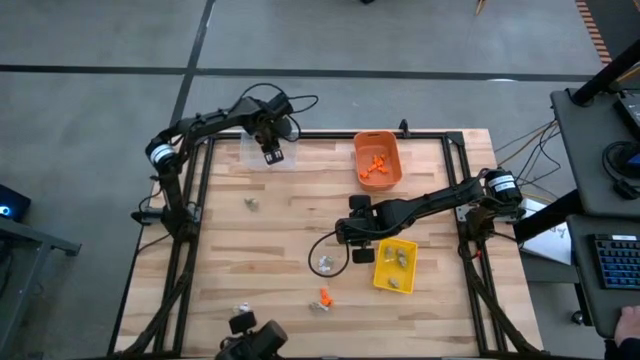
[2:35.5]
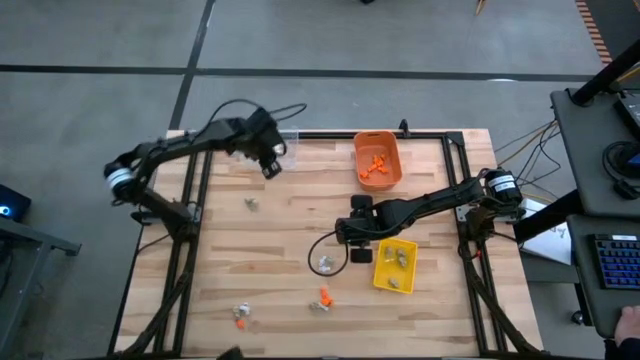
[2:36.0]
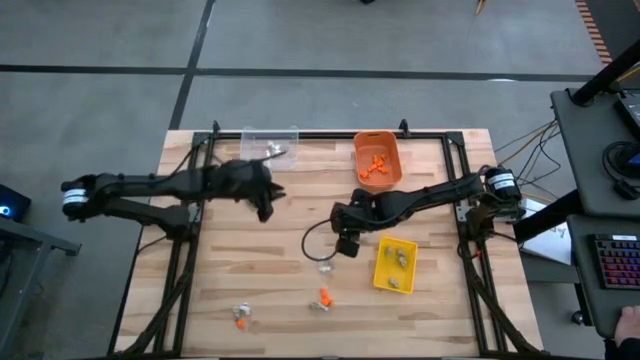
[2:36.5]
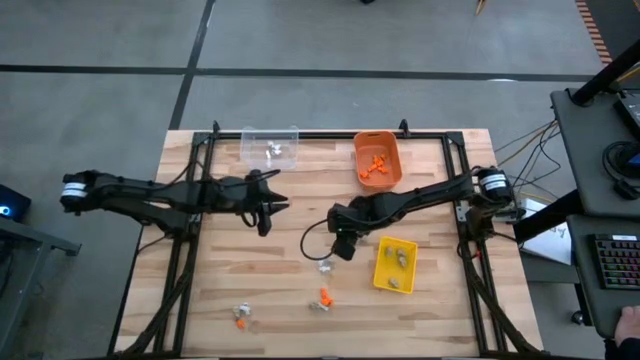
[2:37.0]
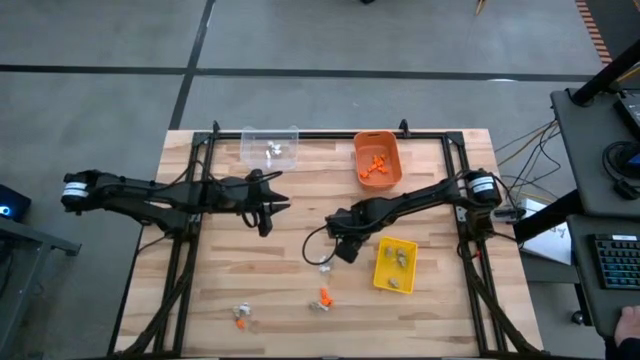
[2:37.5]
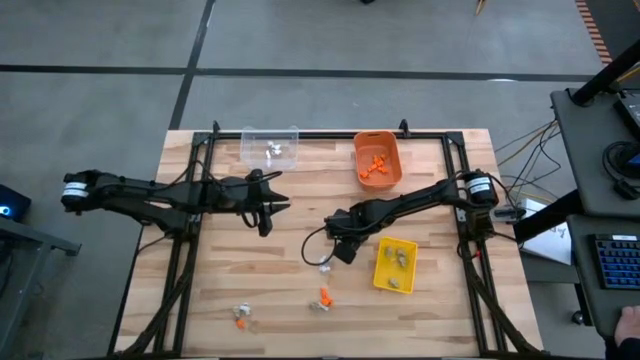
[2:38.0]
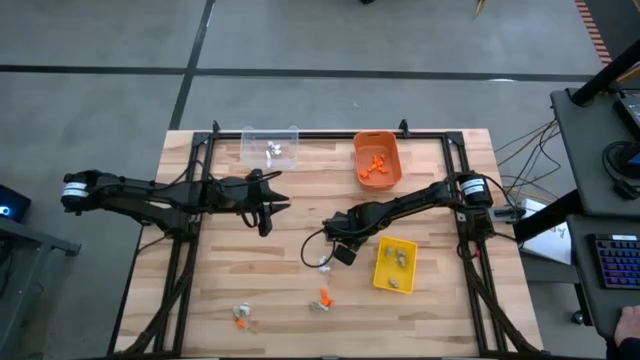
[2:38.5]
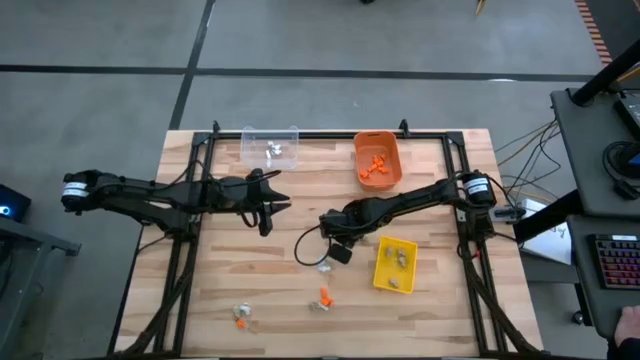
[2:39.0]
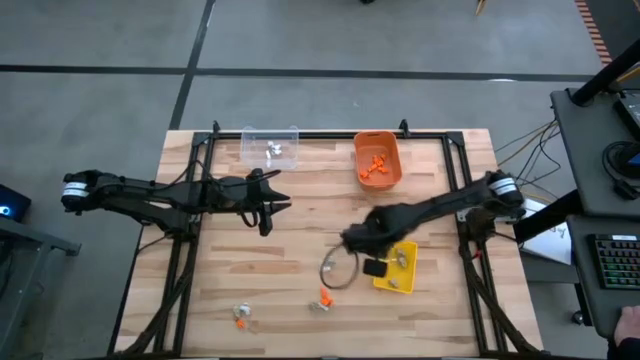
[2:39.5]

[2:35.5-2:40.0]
Task: Sort Halloween decoration
Put the gray skull toy into the yellow bin

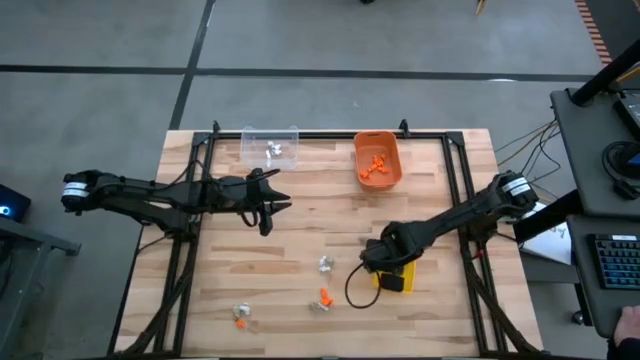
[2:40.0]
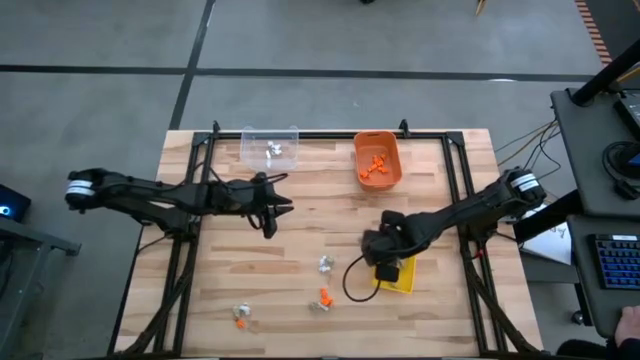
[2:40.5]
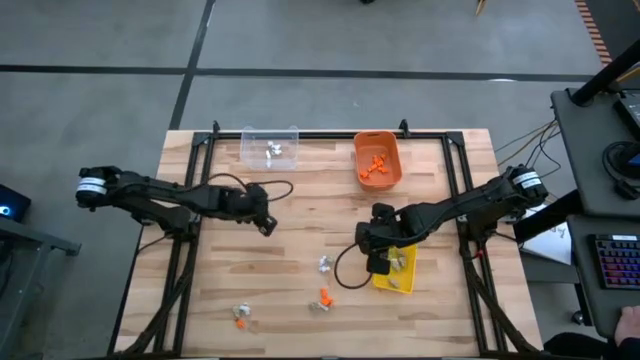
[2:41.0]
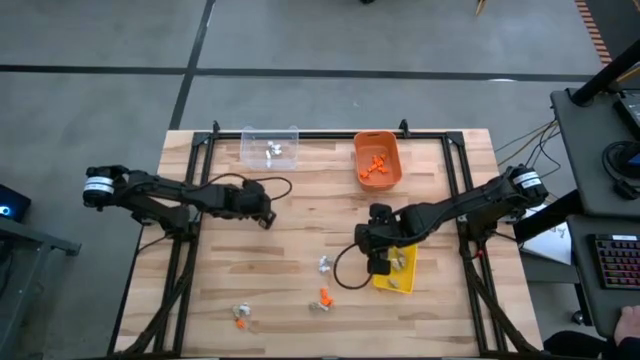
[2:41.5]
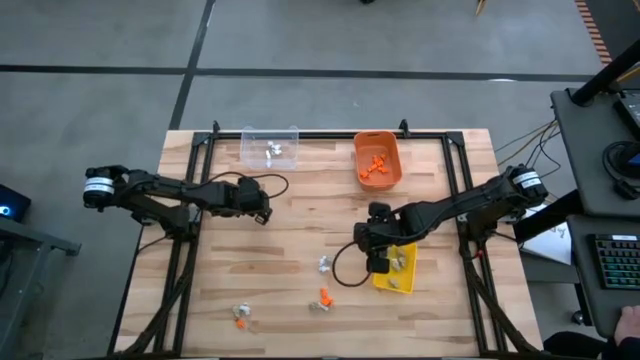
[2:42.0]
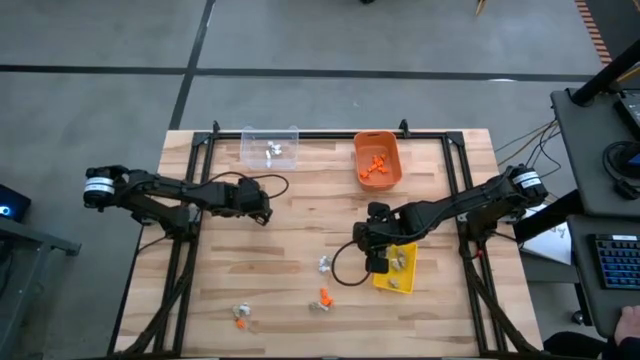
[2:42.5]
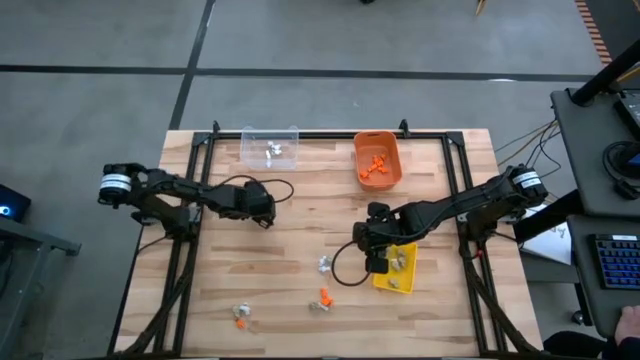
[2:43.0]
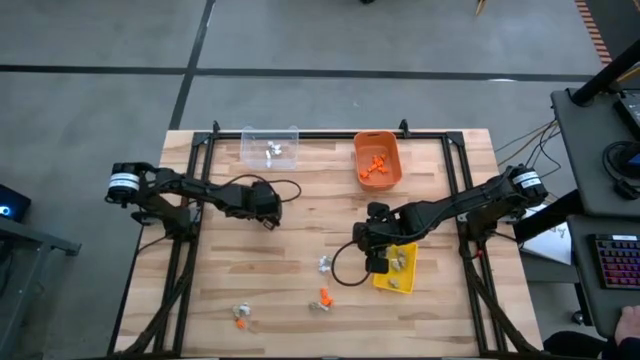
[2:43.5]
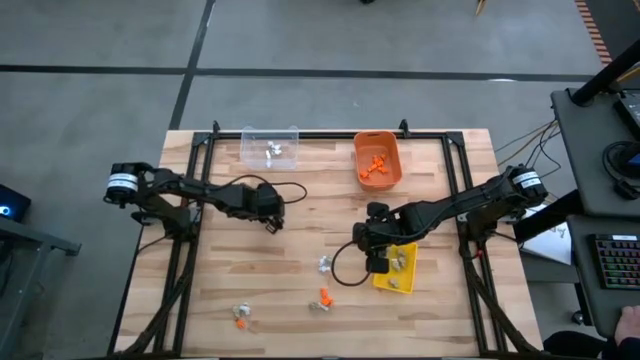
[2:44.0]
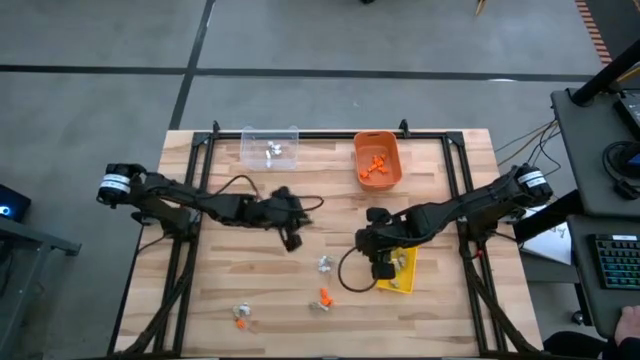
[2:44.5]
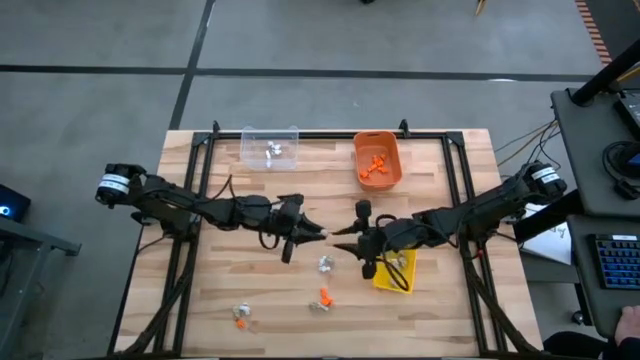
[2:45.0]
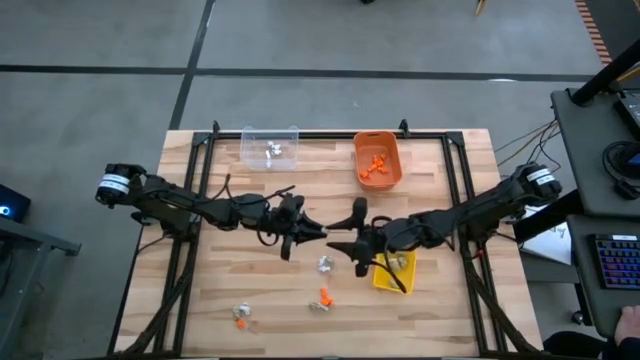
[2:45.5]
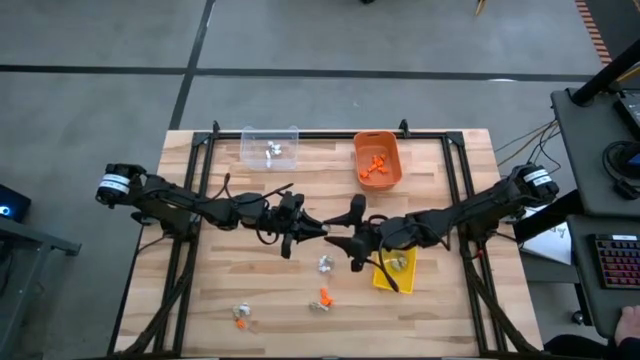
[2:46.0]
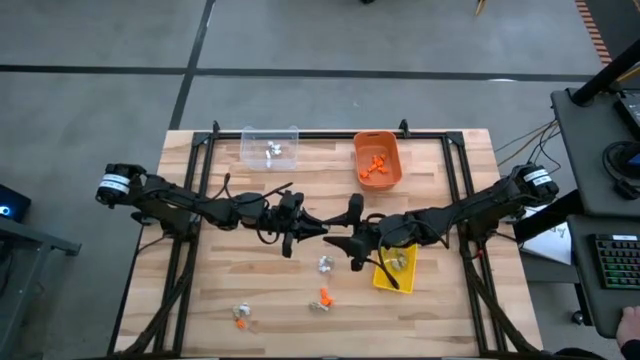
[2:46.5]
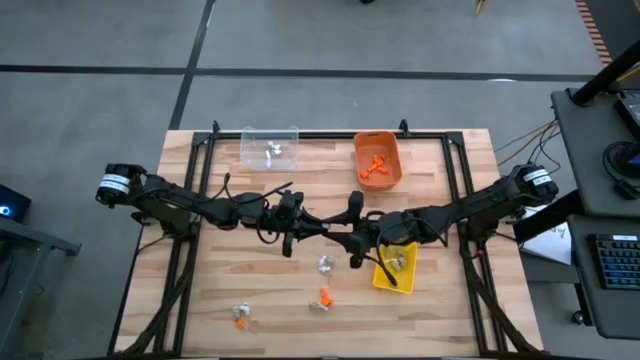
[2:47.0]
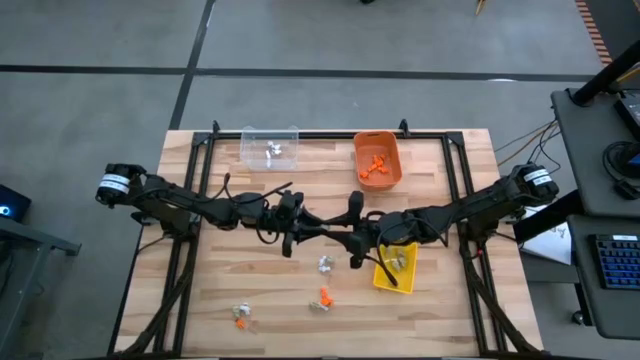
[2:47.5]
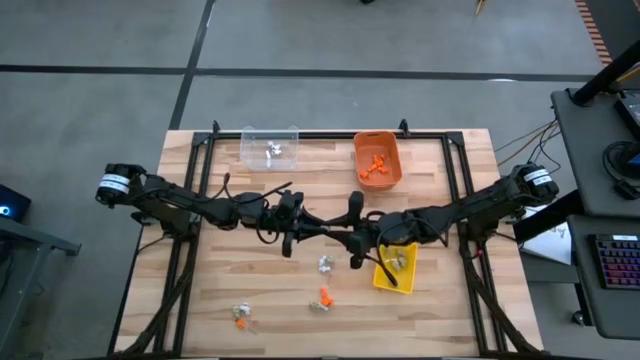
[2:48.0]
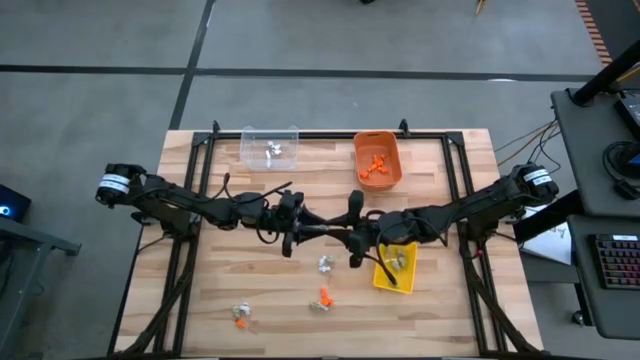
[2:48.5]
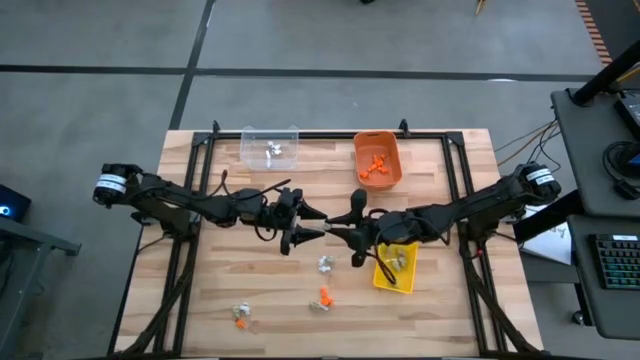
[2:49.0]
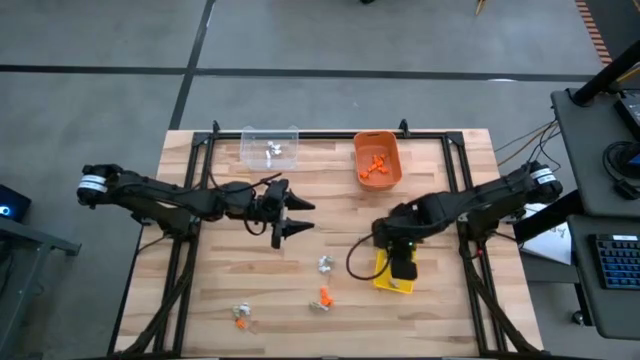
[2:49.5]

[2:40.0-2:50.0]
Put the gray skull toy into the yellow bin

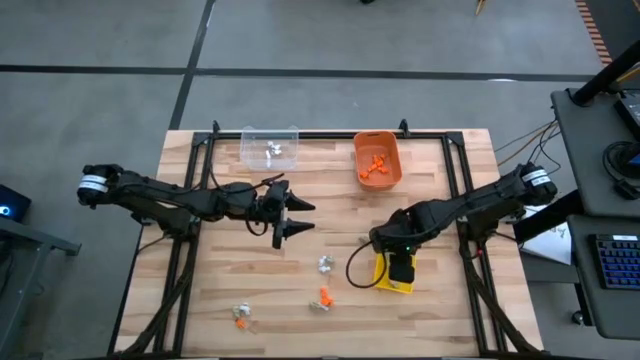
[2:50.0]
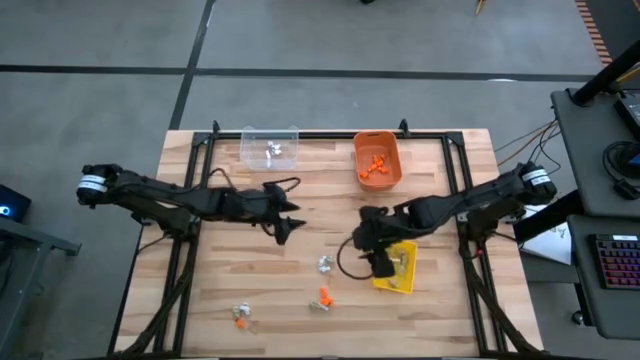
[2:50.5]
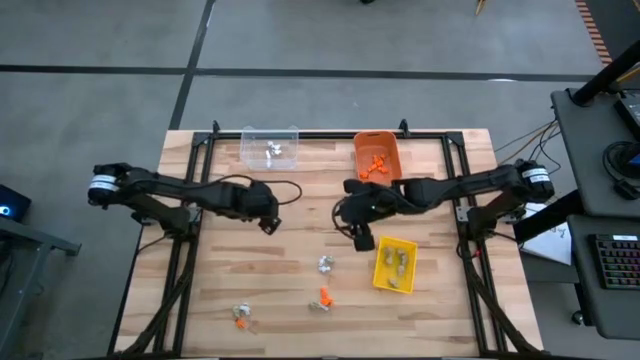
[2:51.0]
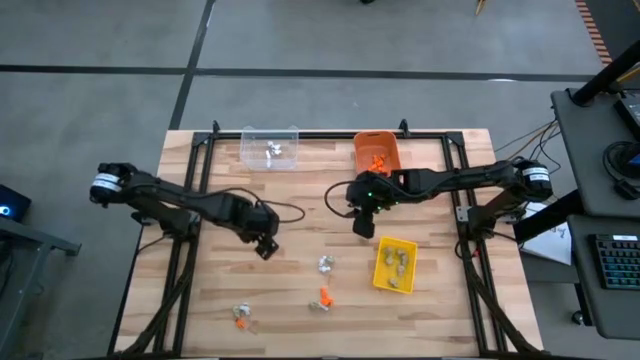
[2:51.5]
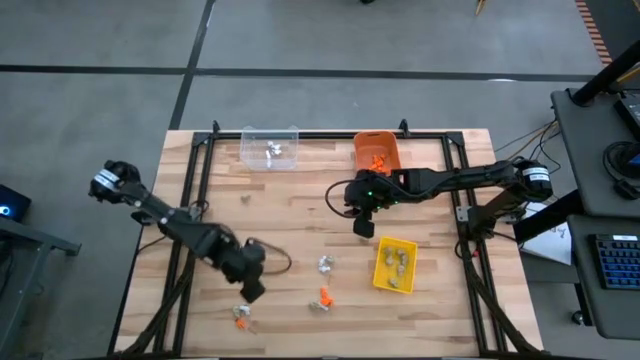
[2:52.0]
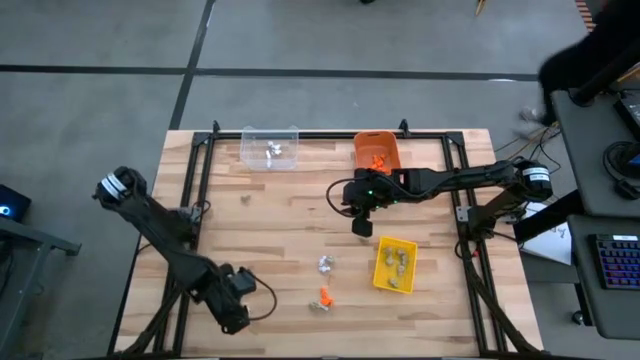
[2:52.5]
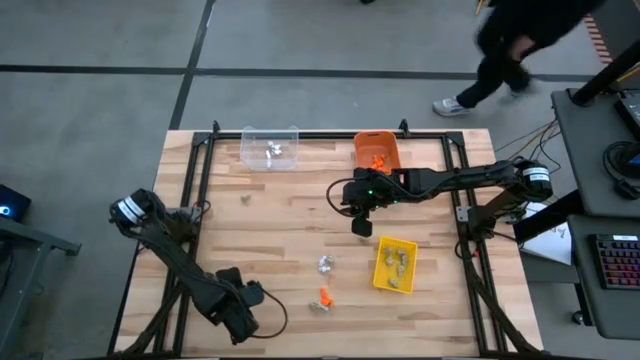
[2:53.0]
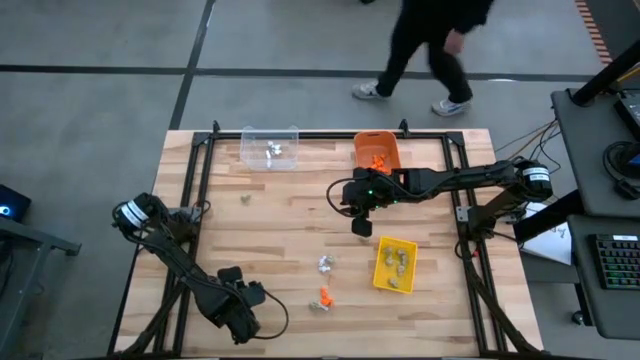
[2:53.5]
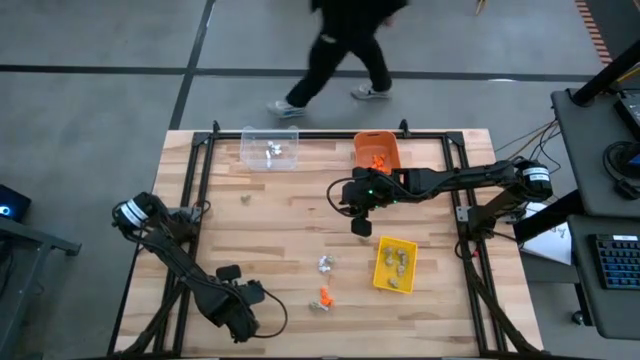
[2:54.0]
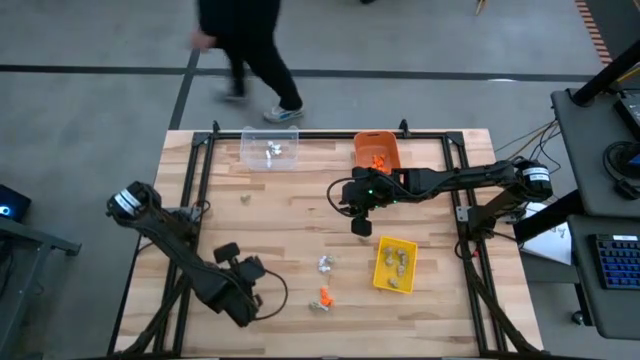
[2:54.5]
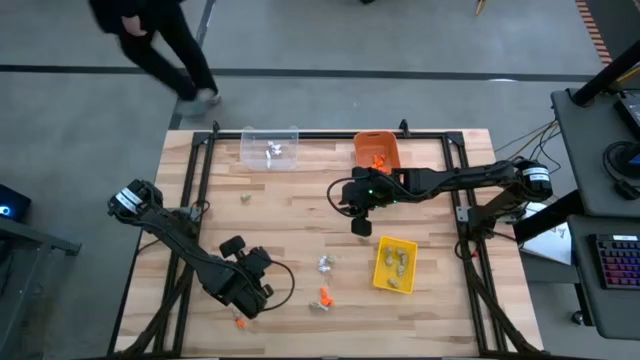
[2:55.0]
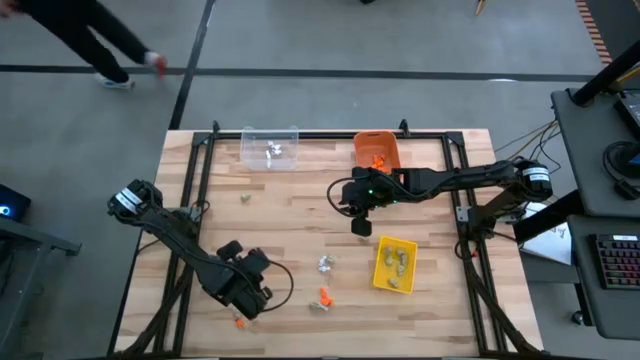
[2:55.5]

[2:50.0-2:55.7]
Put the white skeleton toy into the transparent bin

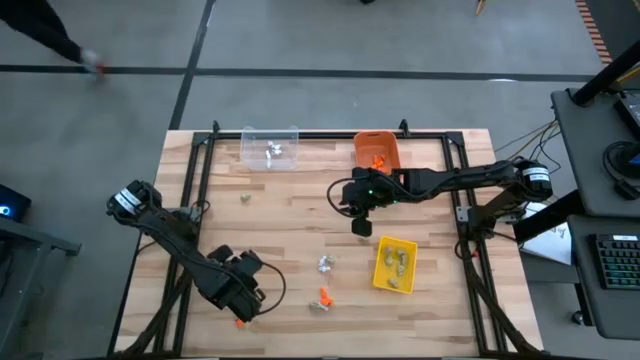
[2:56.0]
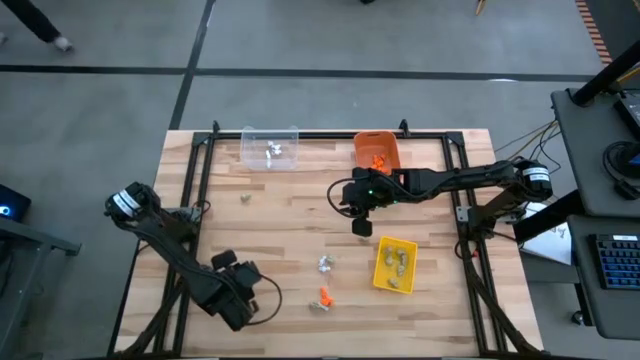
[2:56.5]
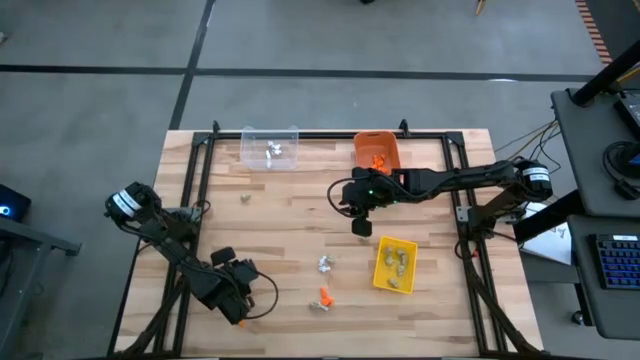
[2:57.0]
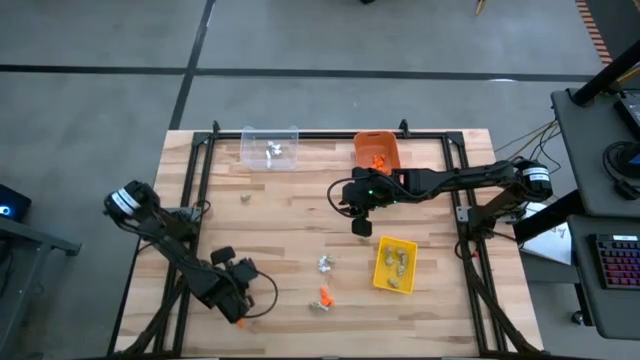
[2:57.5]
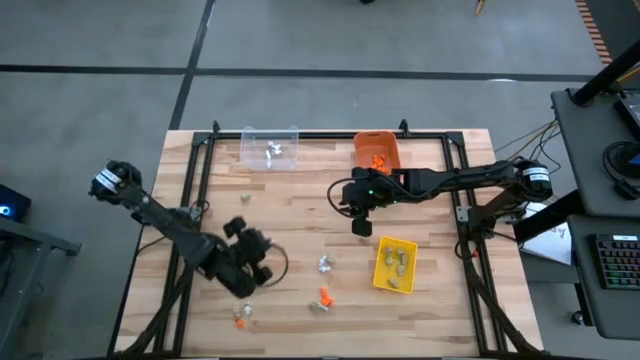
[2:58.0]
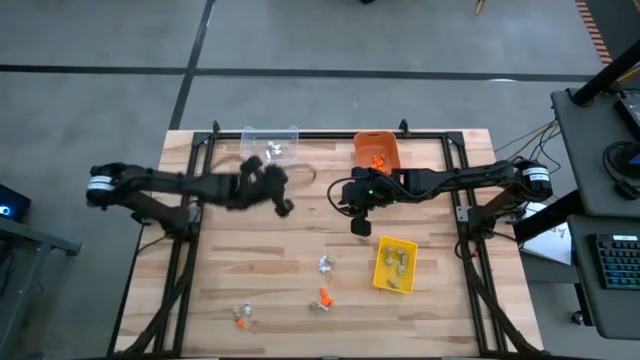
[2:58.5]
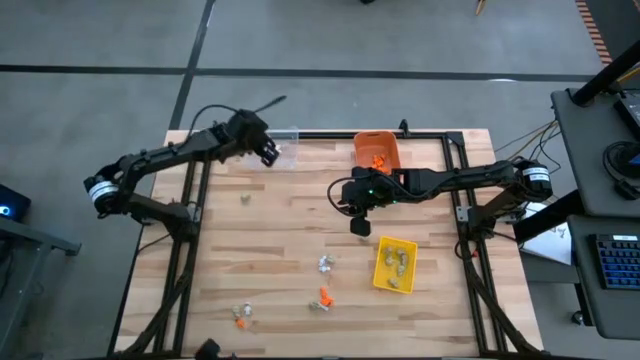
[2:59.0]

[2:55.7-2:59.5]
Put the white skeleton toy into the transparent bin
